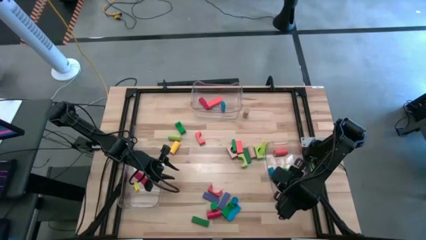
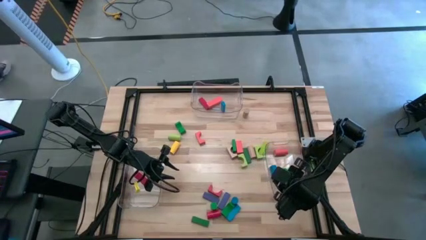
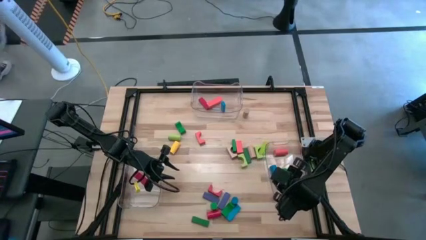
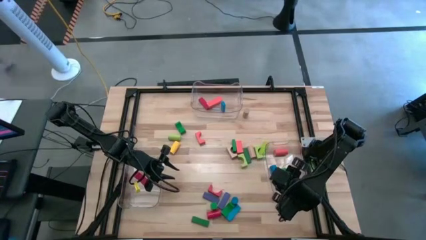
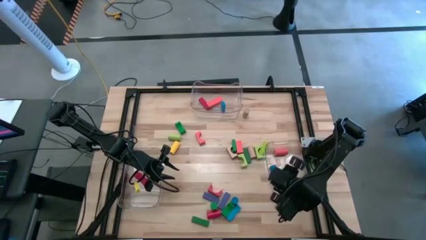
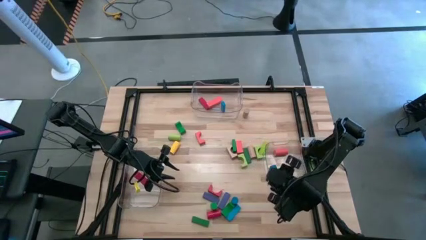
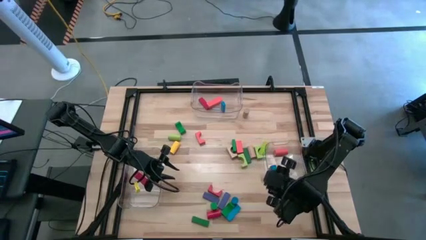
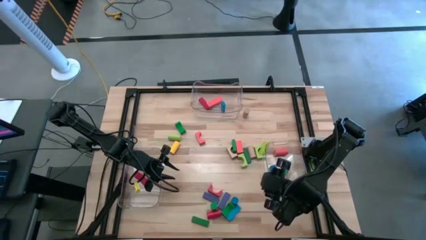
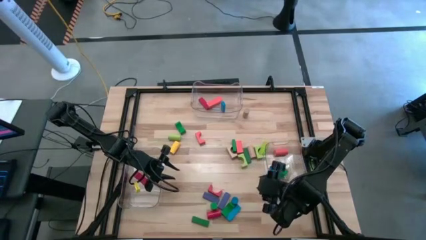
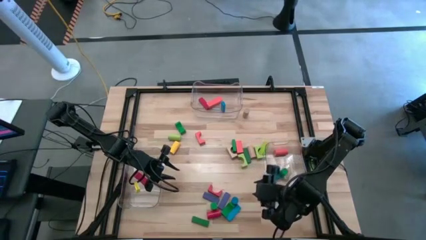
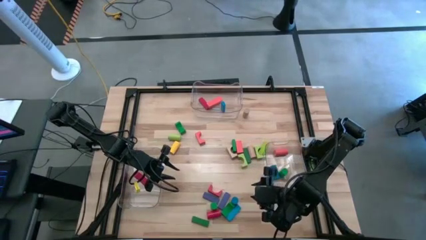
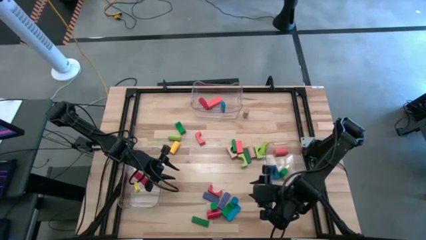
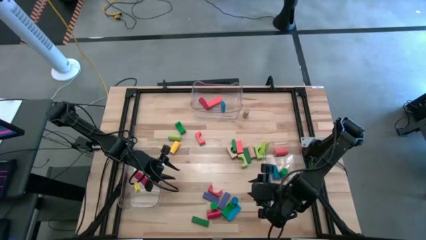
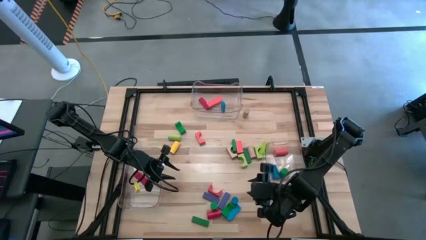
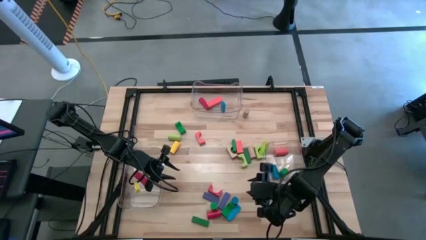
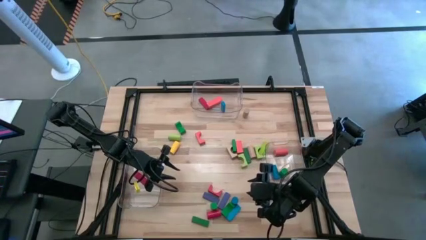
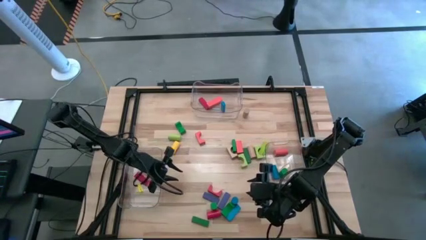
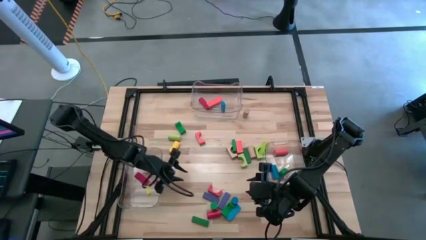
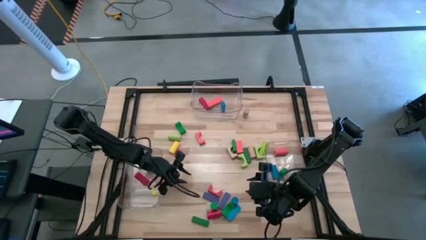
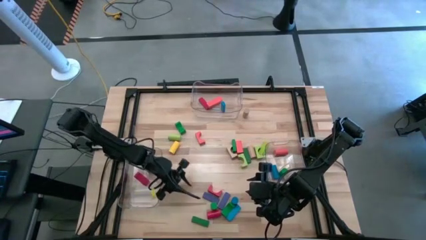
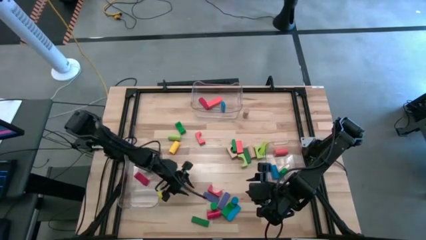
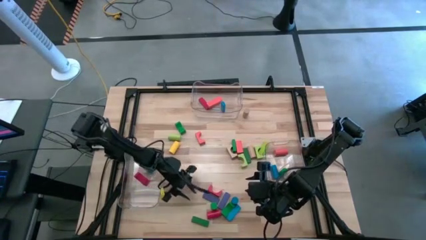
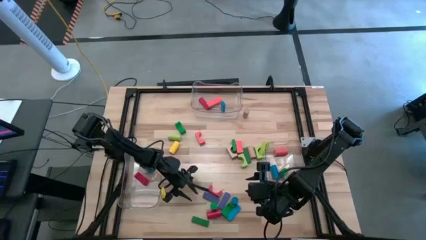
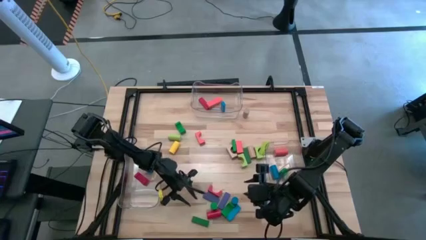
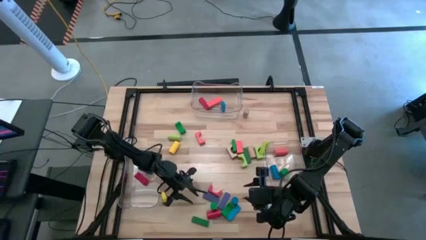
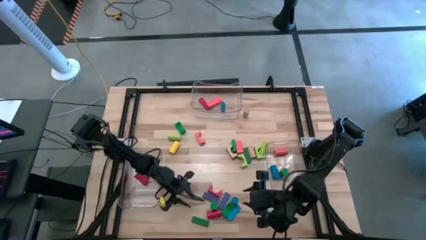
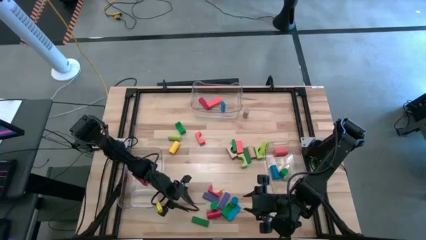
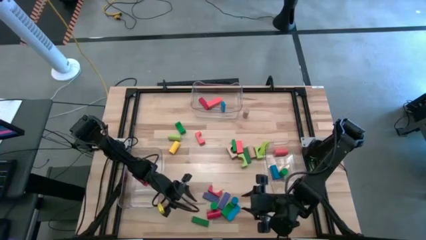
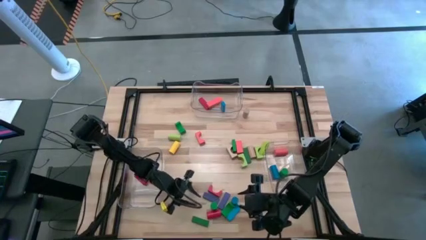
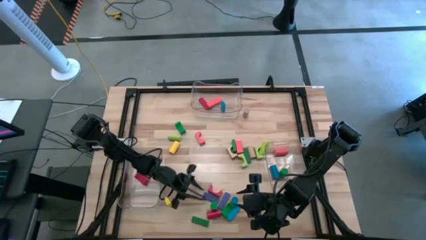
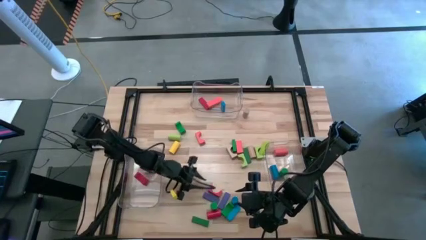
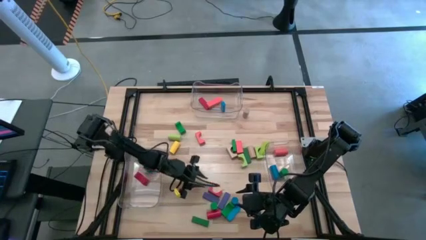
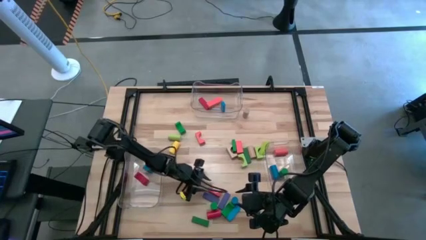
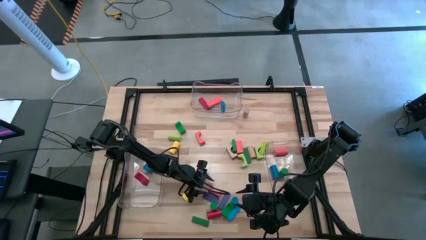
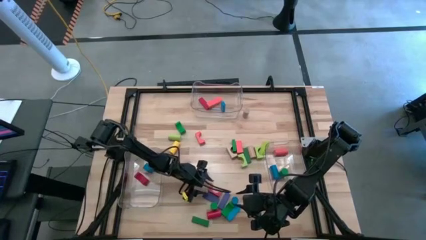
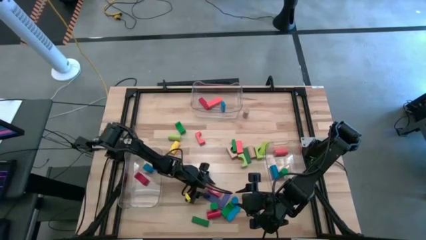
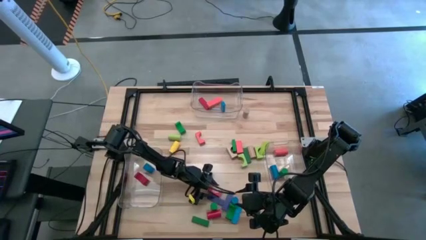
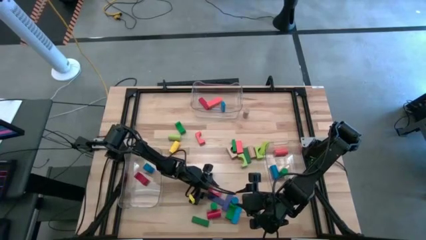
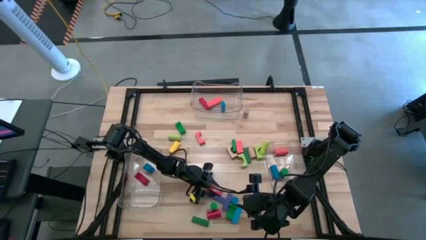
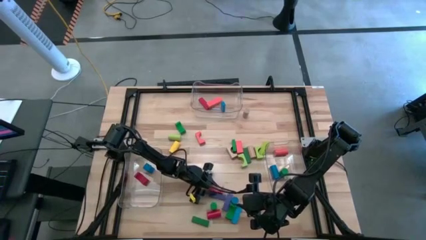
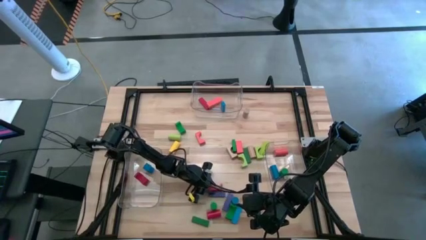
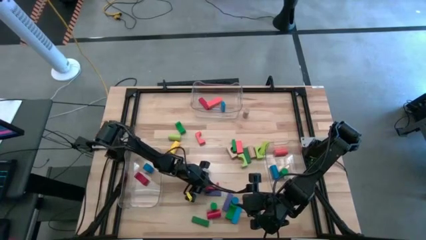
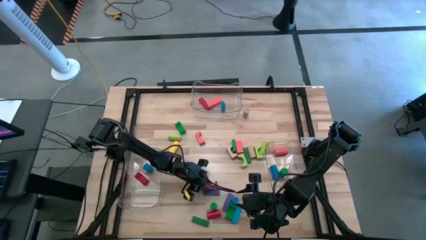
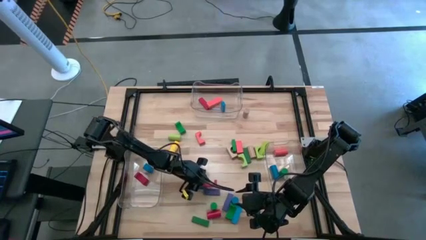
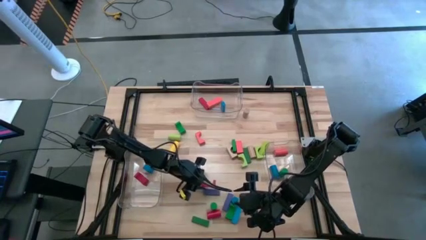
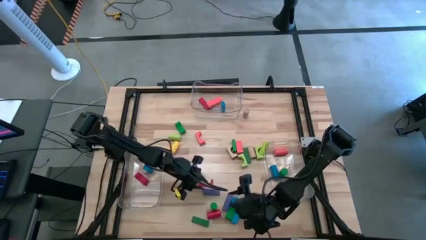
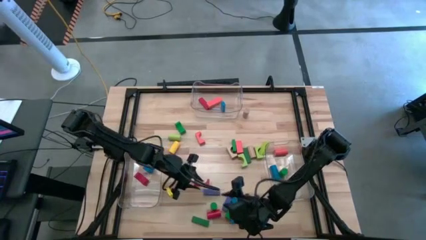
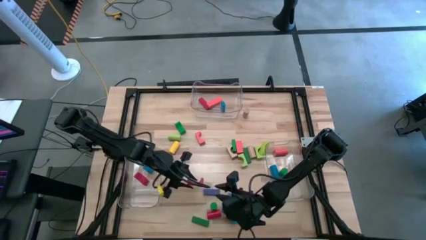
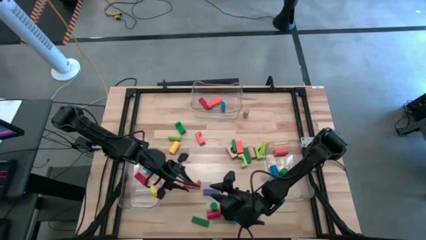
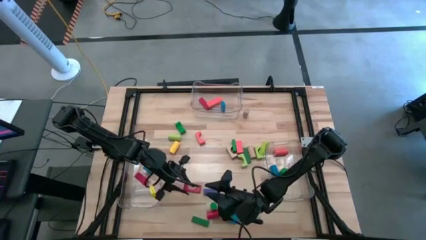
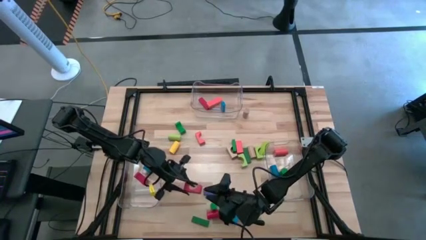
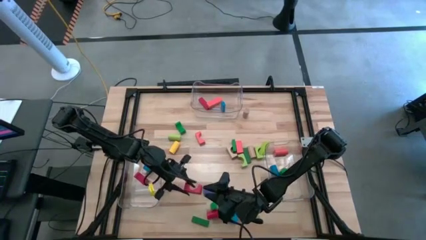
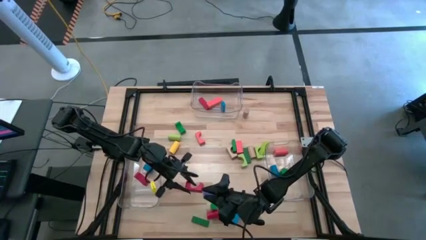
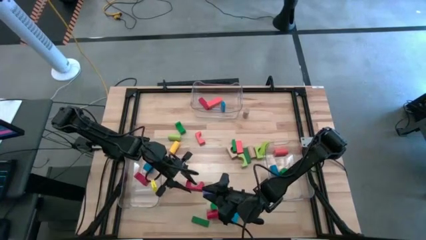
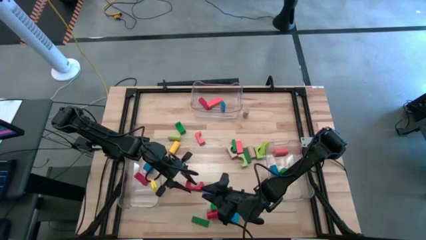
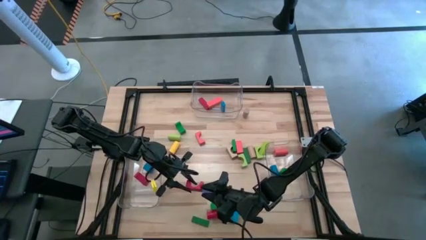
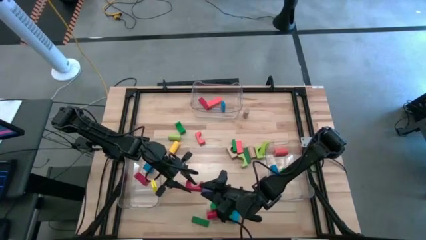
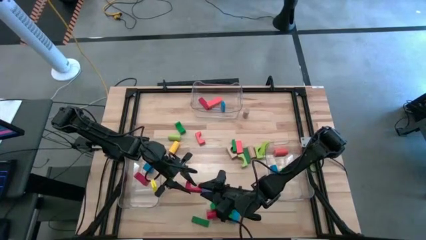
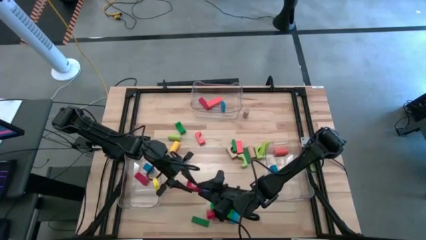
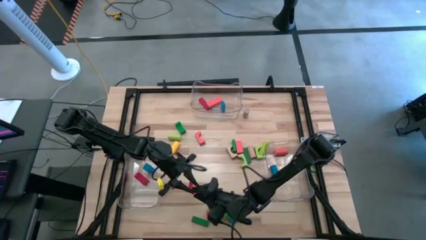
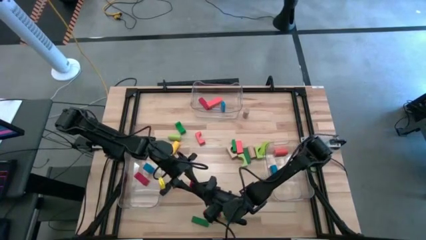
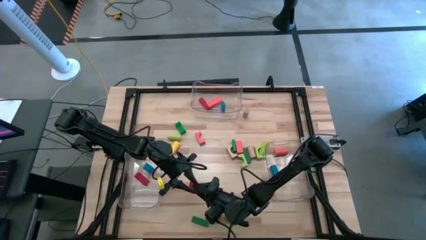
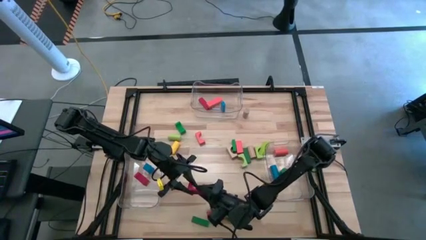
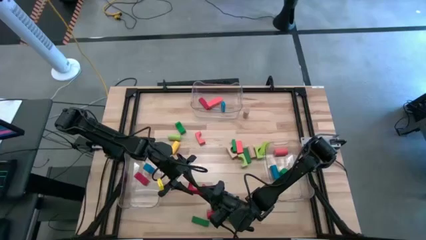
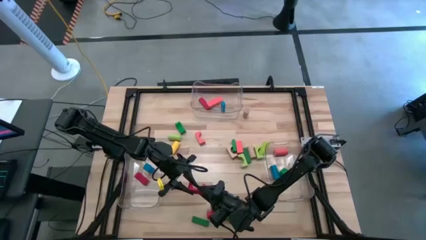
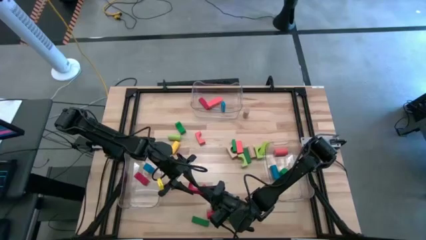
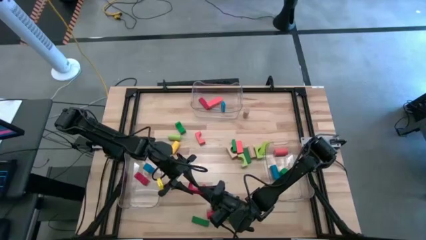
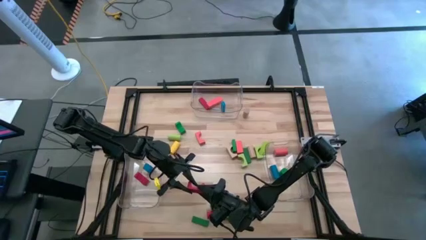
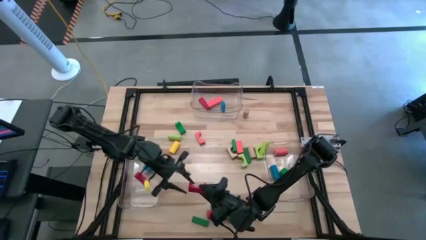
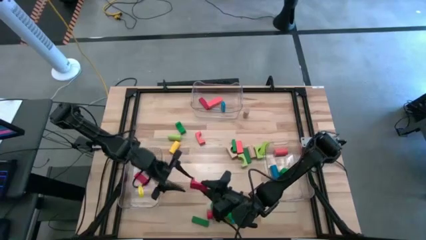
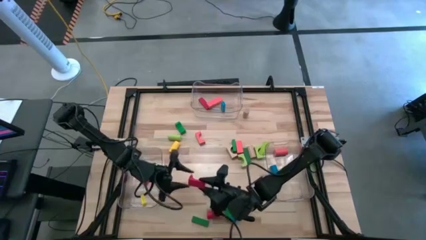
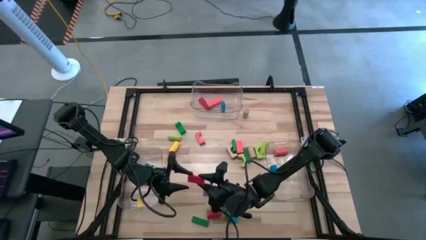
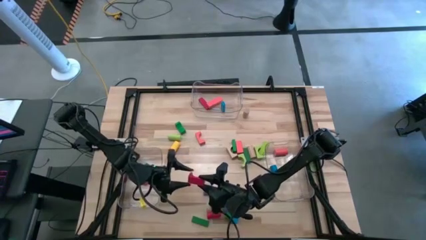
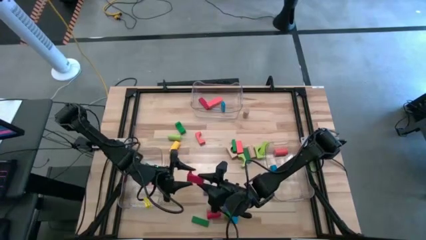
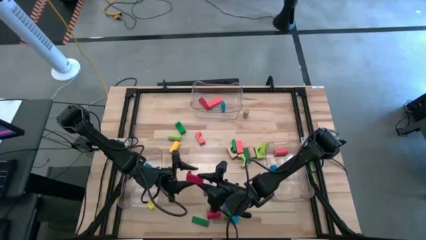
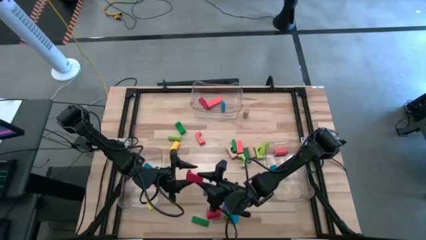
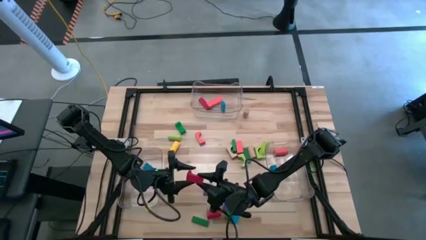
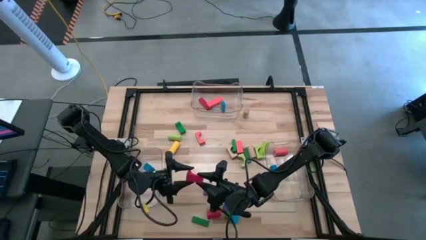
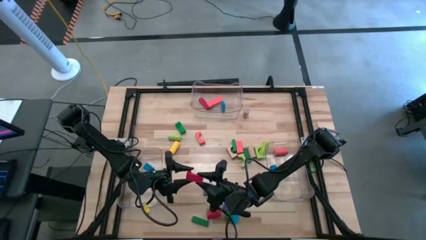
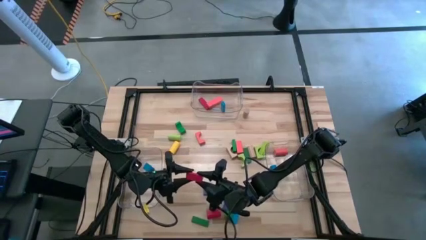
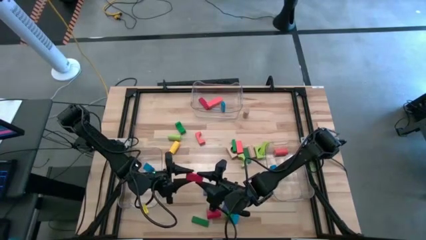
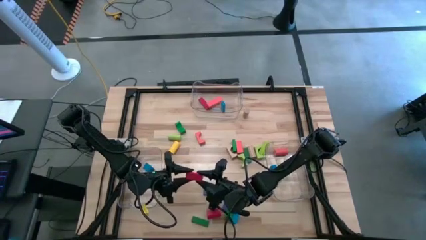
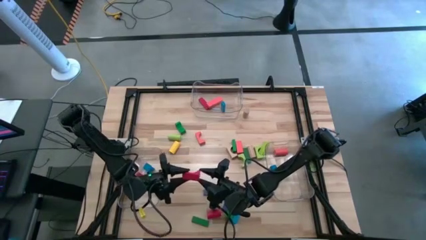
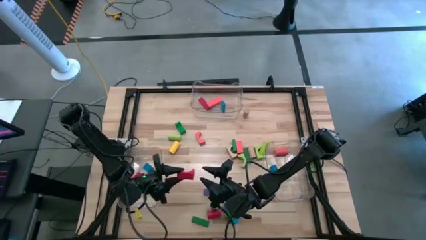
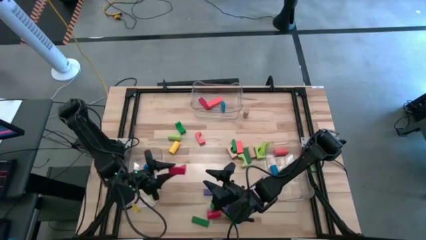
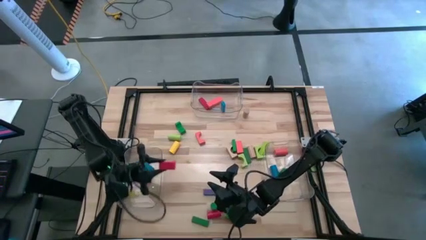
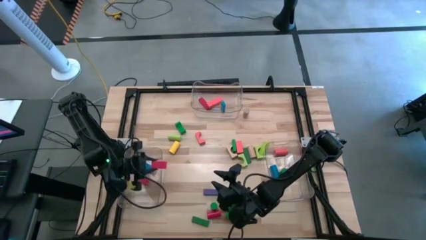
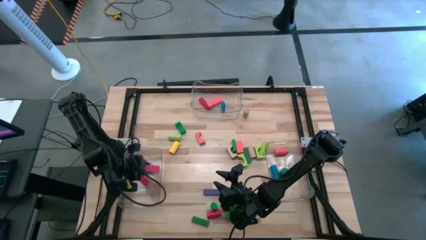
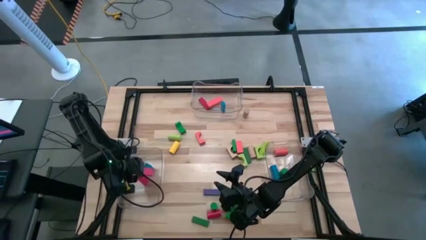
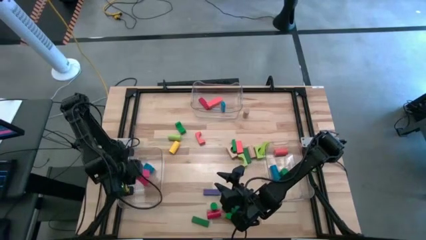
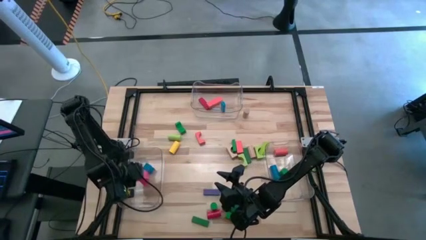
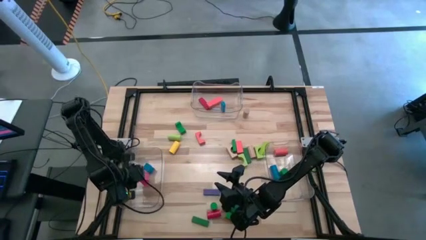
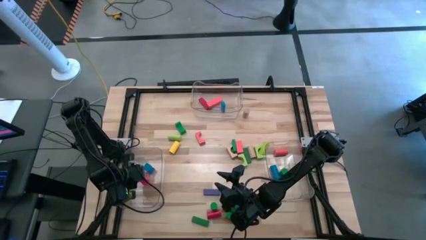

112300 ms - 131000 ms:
Task: Sort blocks by size
Put the red arc block into the left transparent bin
